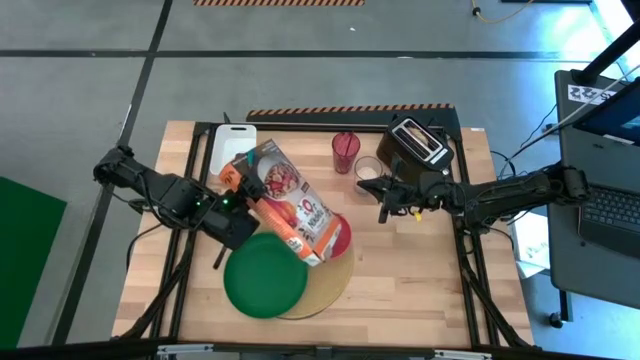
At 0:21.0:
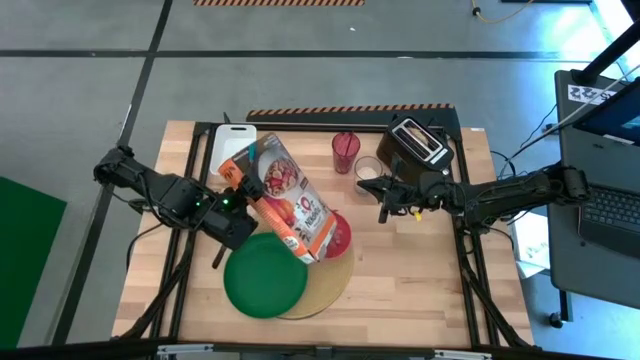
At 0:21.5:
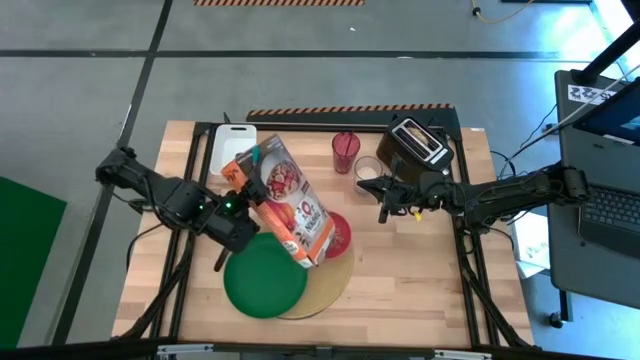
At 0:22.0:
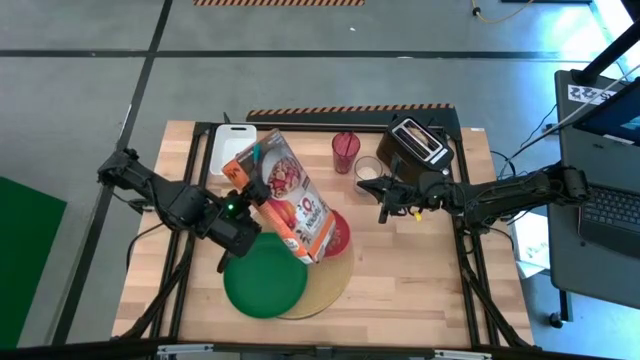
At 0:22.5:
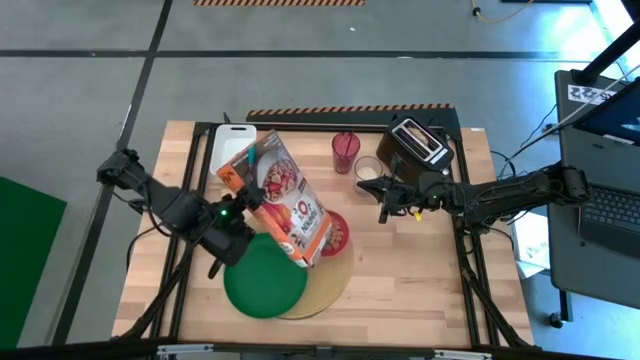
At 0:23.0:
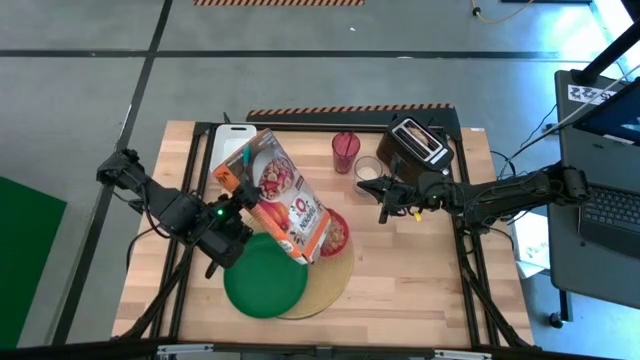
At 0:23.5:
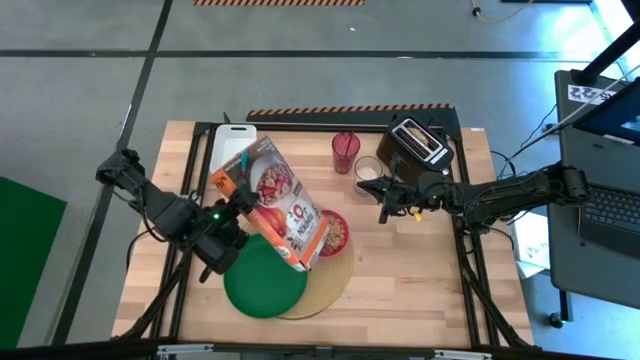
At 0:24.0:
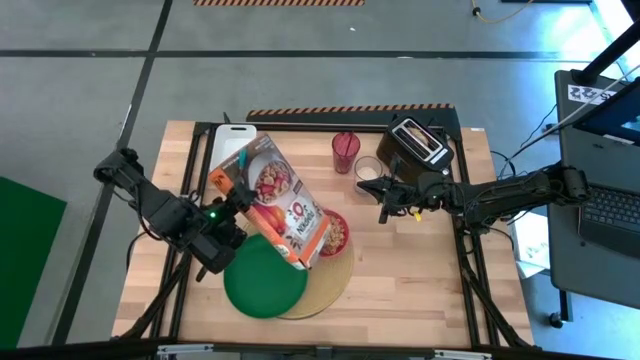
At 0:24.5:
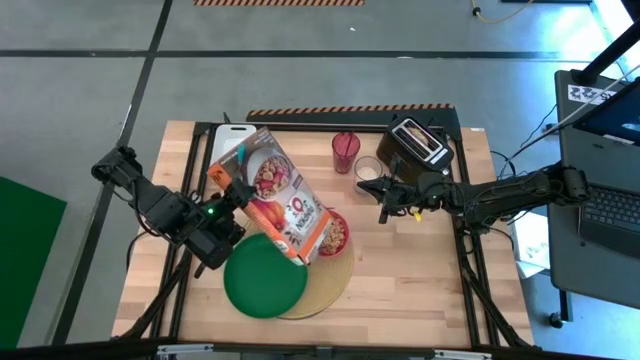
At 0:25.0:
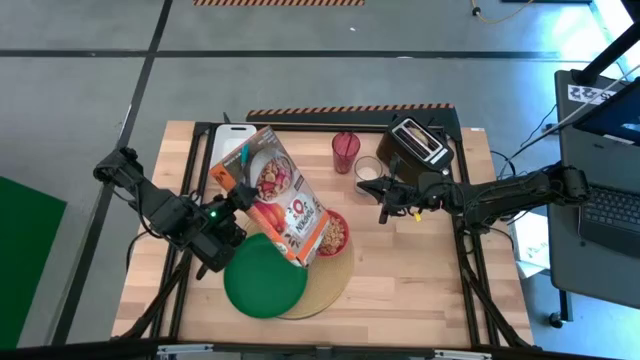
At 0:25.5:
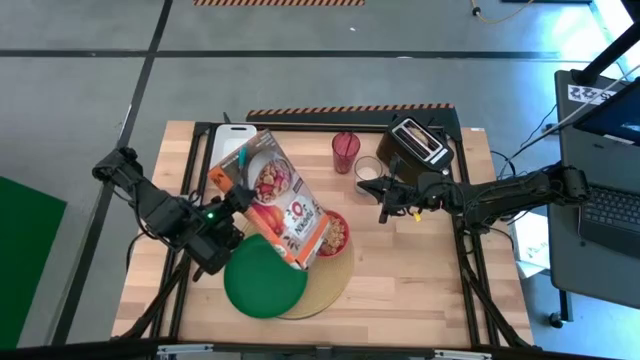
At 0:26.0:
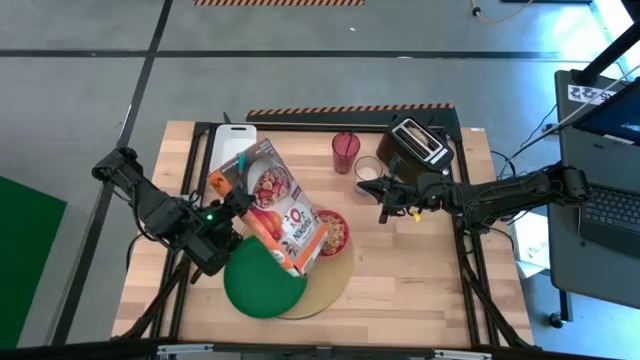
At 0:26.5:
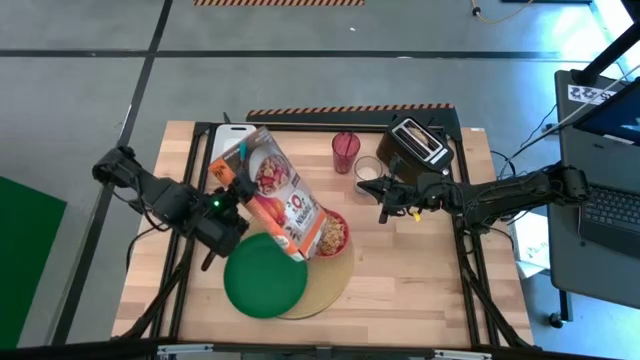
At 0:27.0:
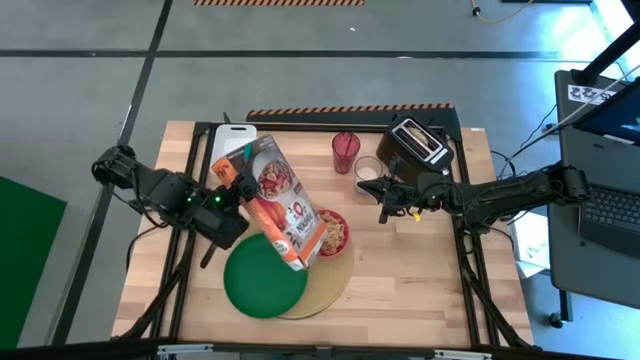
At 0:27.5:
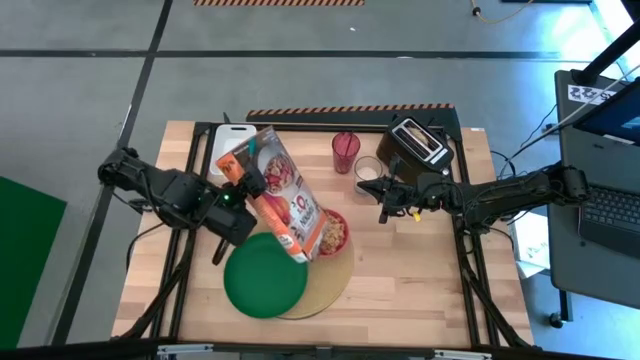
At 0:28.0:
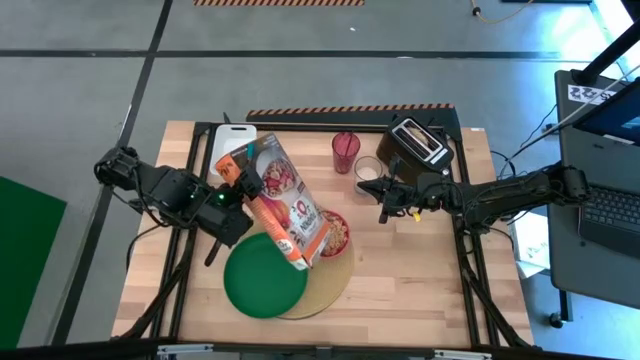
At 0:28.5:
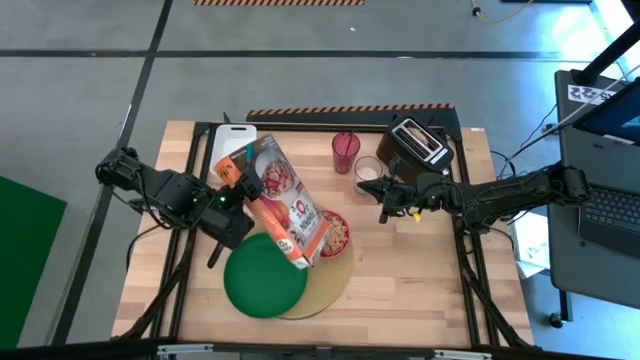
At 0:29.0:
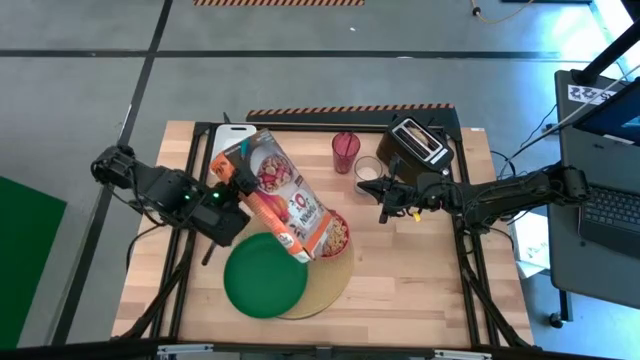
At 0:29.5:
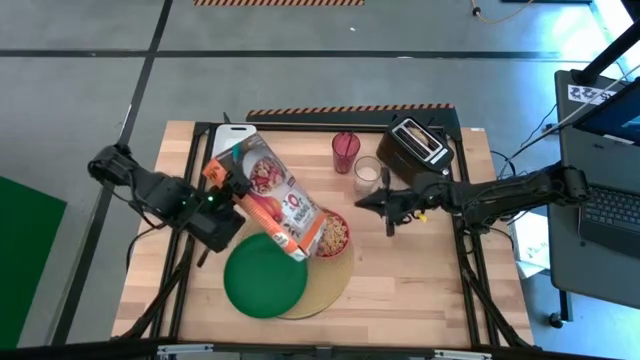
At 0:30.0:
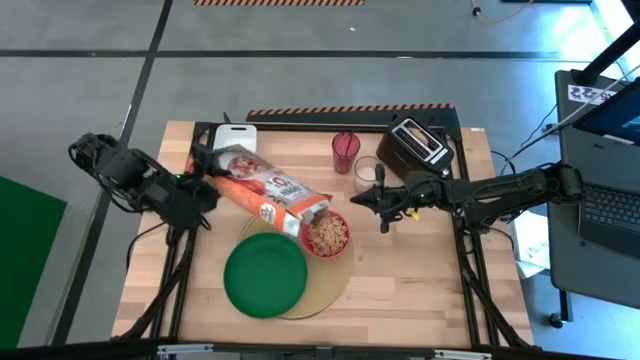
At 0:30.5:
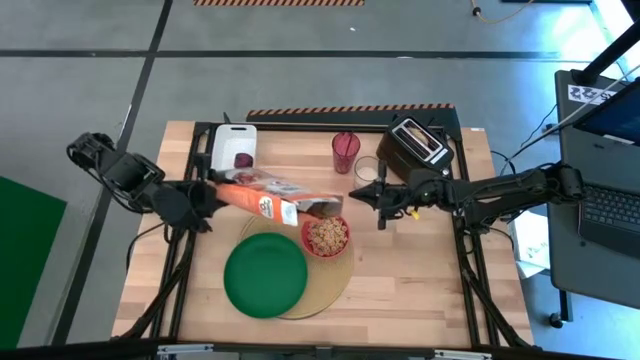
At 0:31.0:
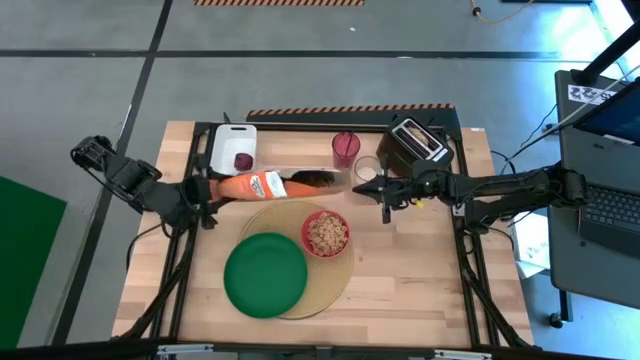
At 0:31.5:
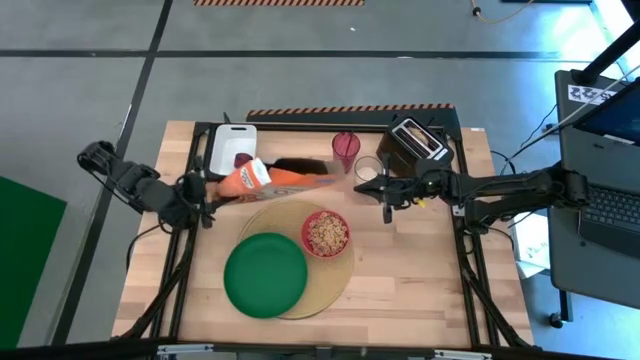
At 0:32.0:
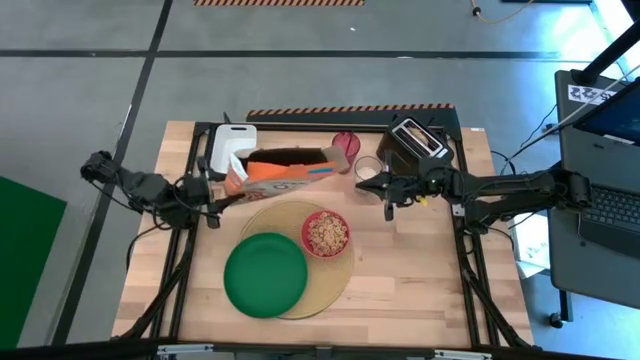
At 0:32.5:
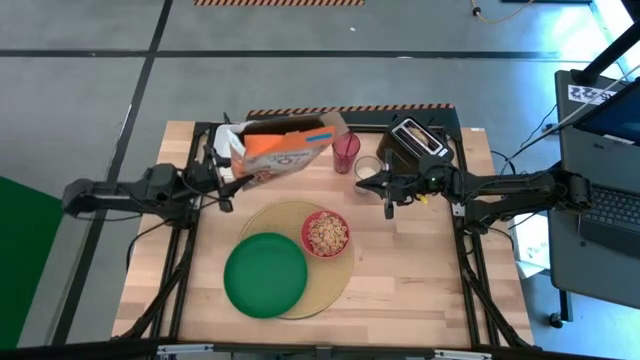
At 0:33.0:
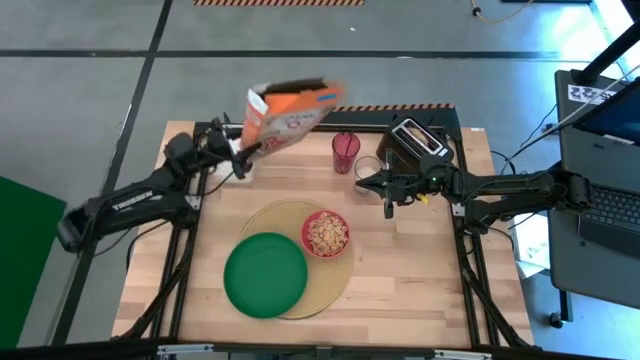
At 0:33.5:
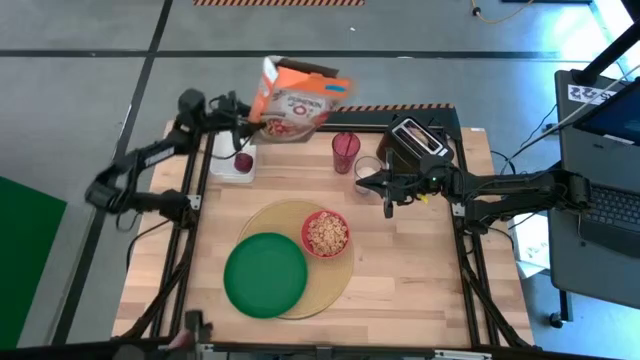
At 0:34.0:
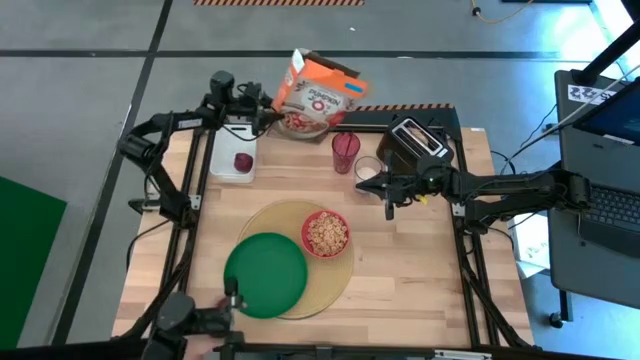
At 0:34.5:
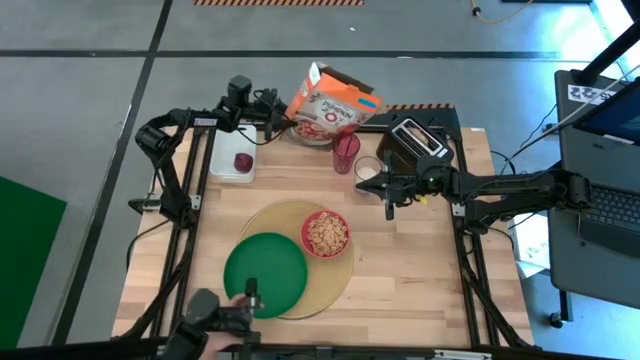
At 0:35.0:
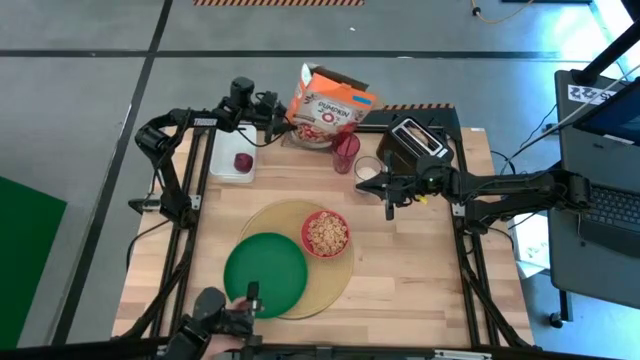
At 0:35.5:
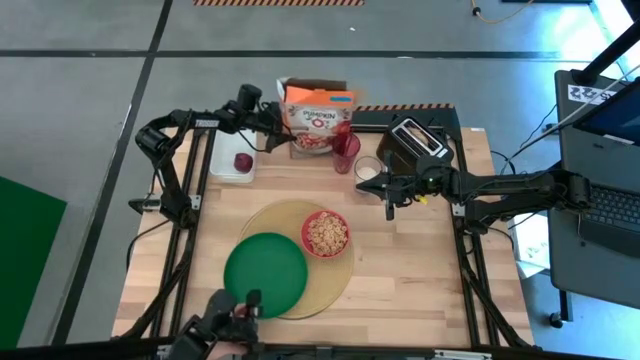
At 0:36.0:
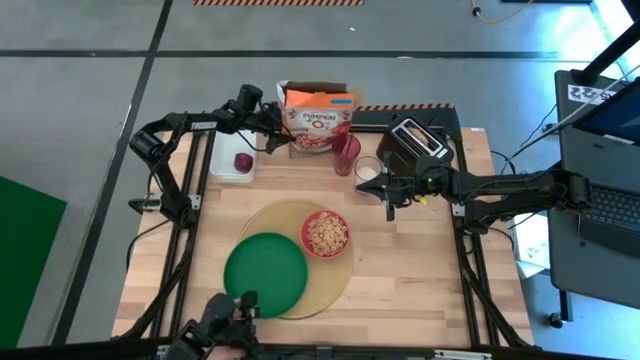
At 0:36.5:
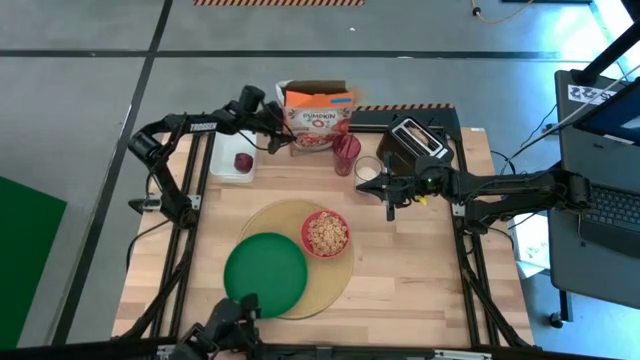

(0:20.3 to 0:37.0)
Task: Arrange a breakfast setting
Pour the cereal from the box into the orange bowl

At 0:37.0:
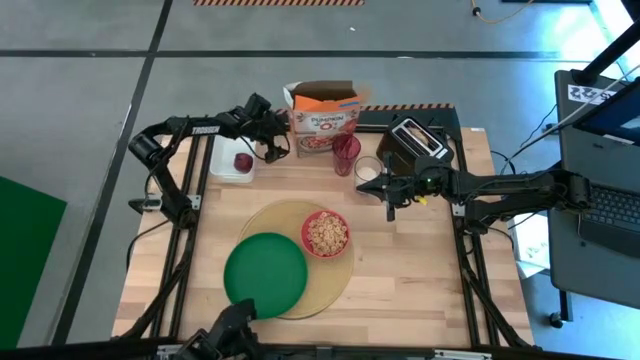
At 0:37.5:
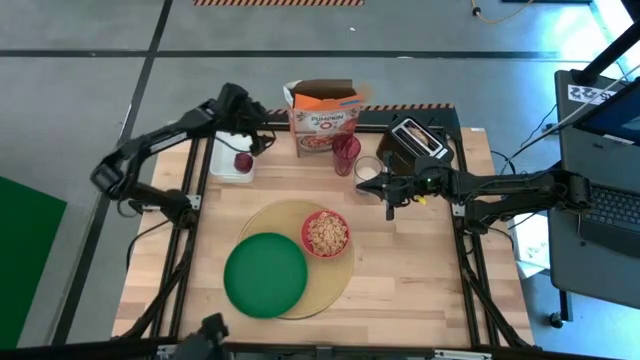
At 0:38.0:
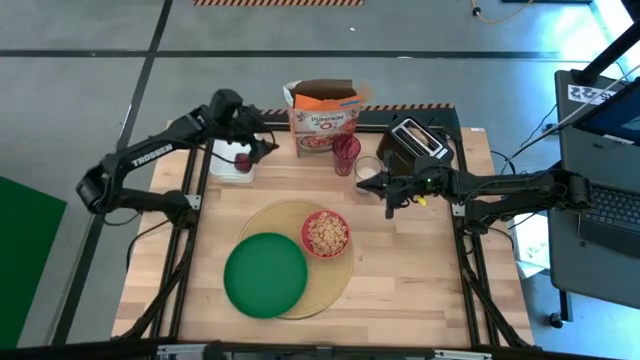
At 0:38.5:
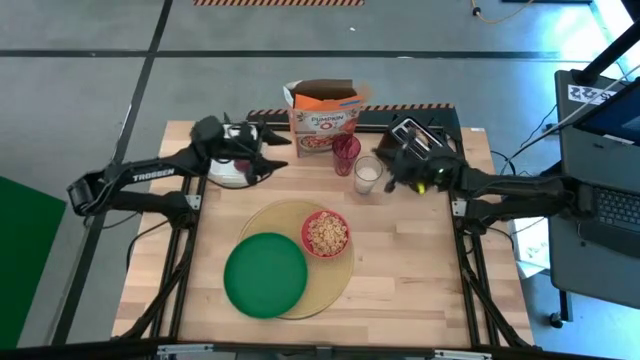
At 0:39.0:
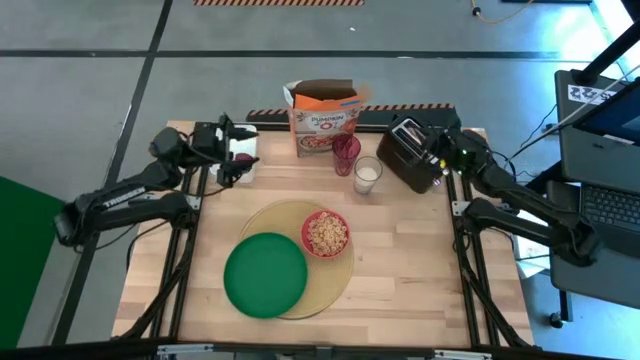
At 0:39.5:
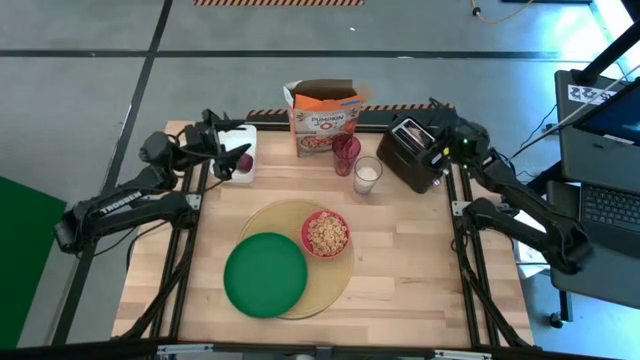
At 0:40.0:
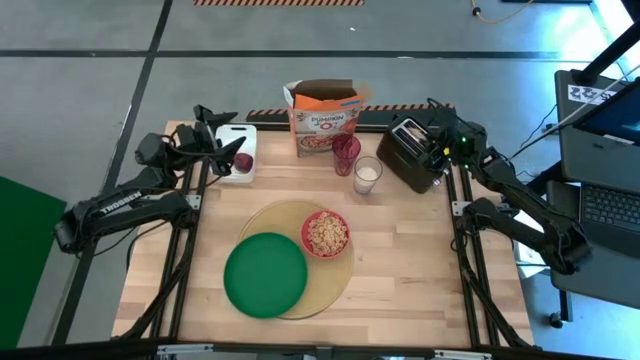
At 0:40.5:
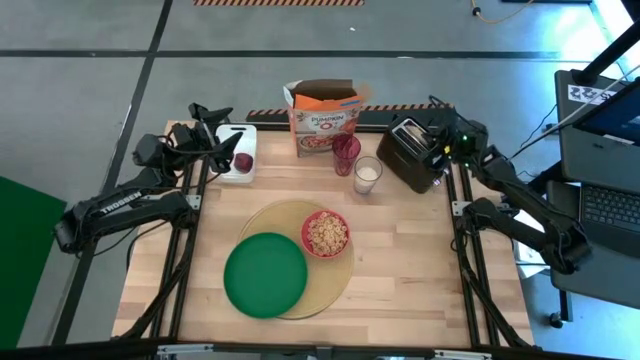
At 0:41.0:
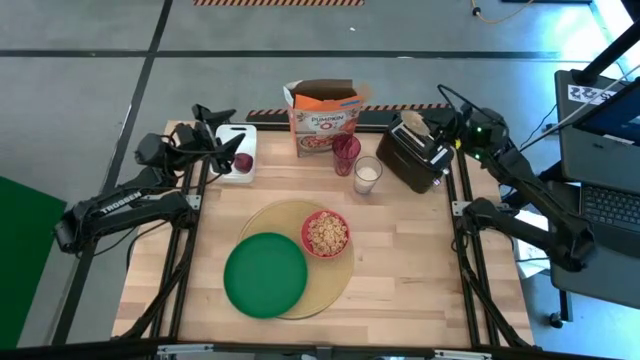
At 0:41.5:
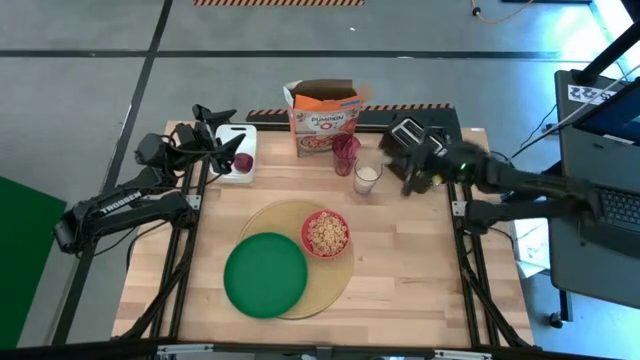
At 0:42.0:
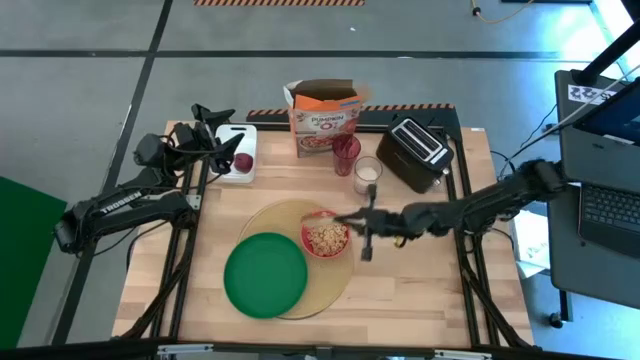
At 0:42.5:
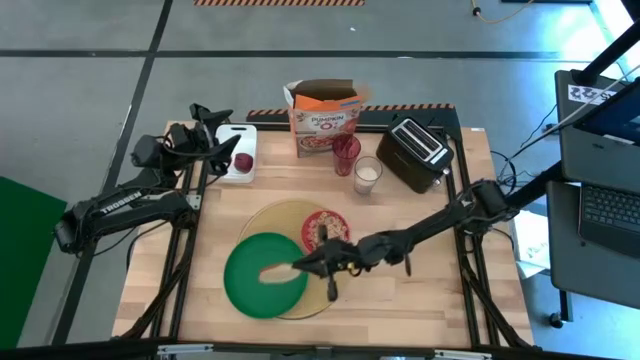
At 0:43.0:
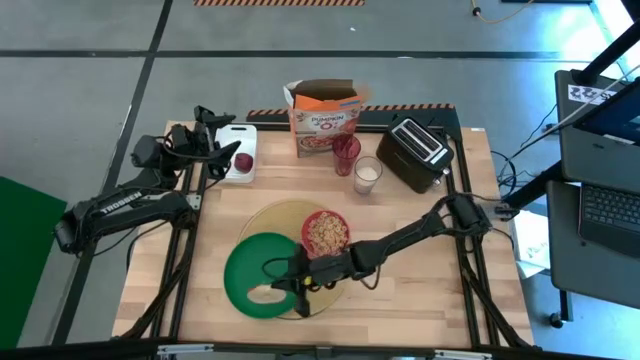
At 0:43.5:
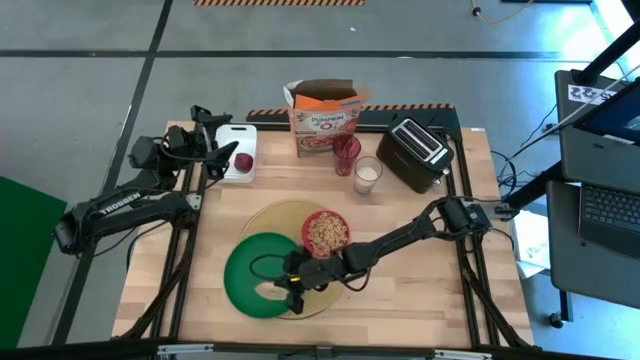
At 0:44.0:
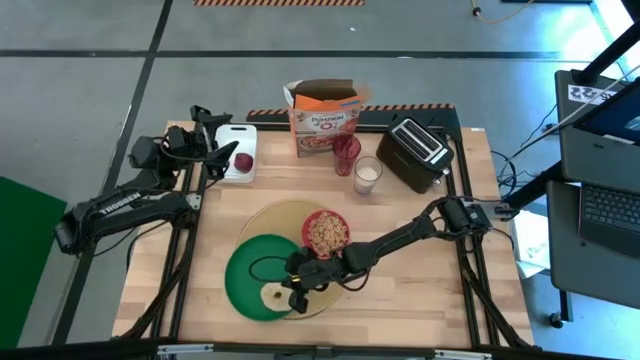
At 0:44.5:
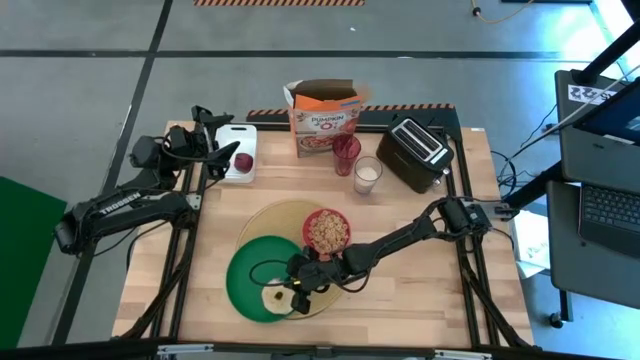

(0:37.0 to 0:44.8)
Put the toasted bread on top of the green plate
